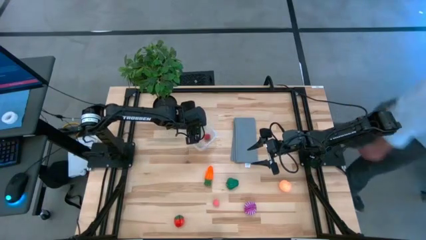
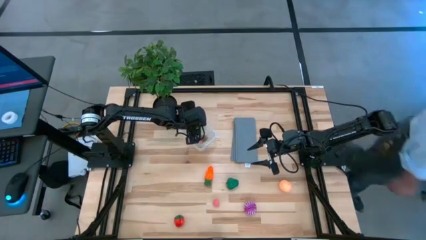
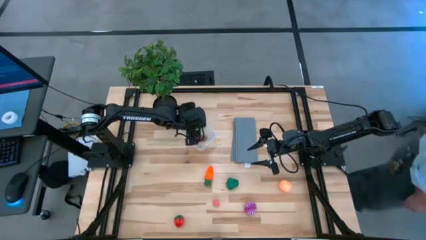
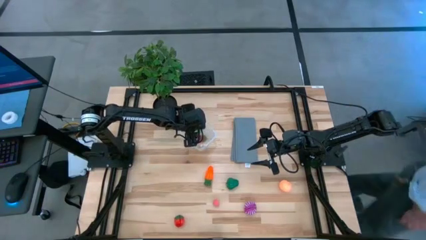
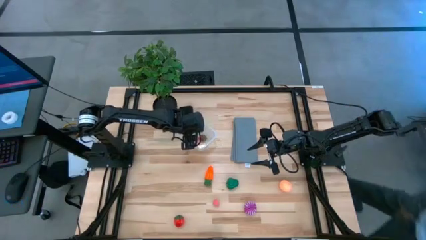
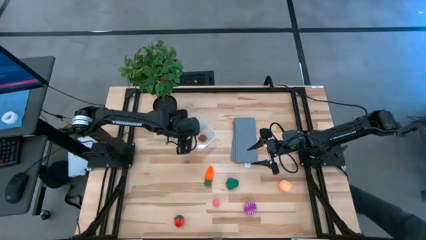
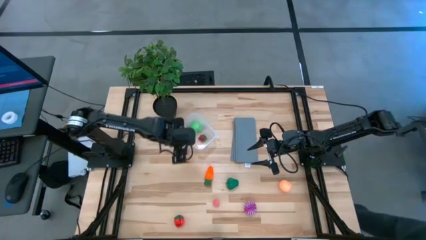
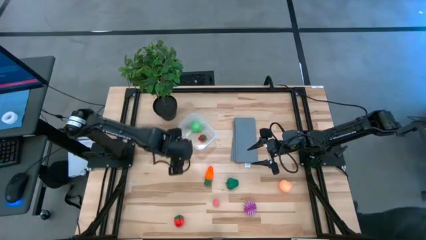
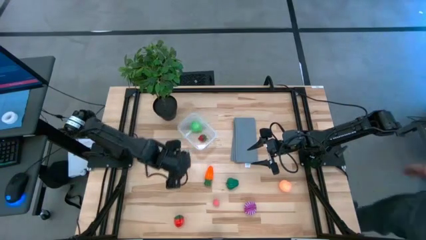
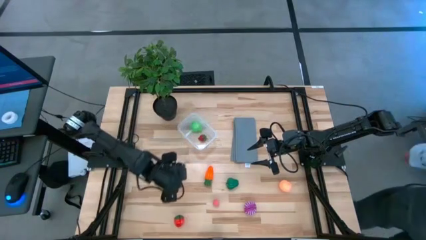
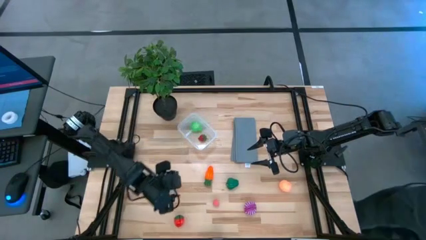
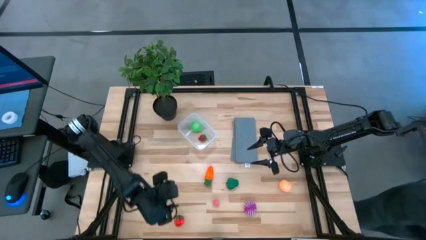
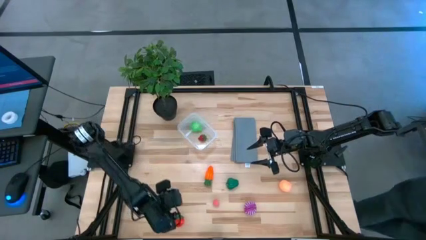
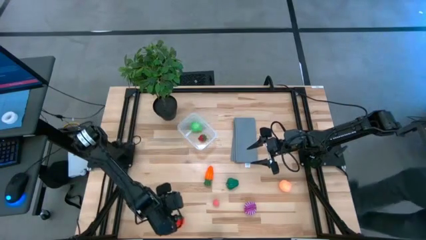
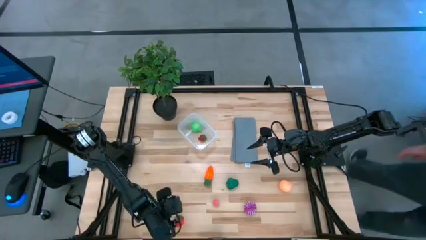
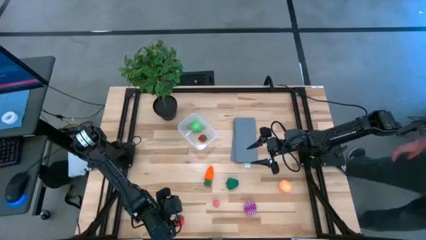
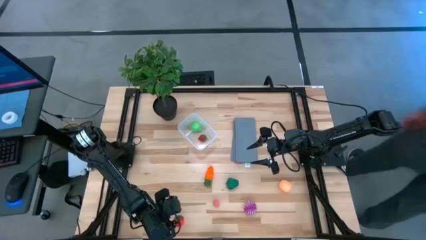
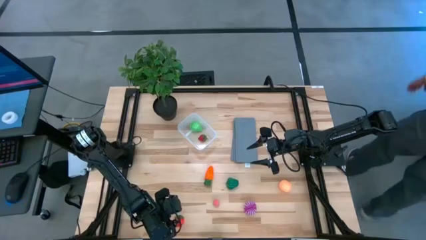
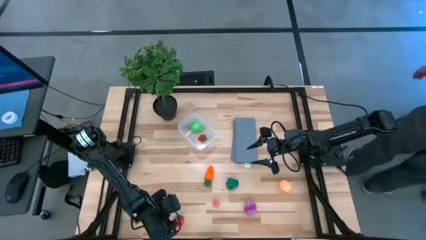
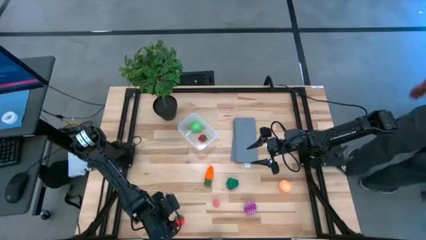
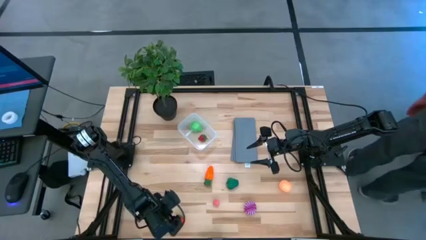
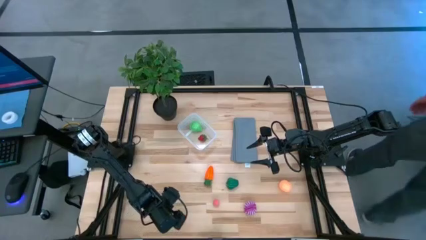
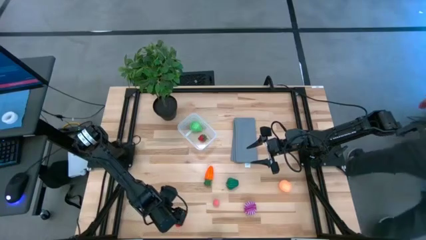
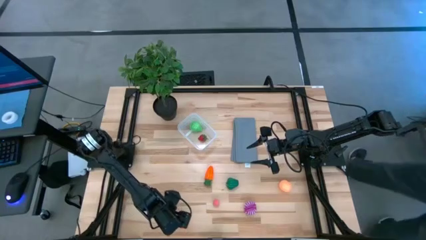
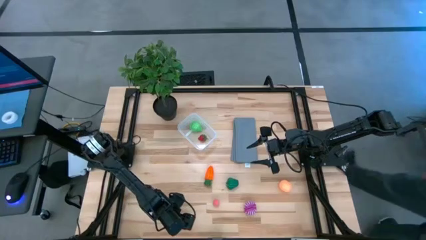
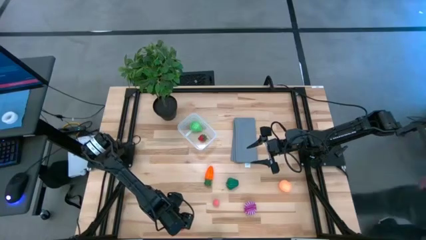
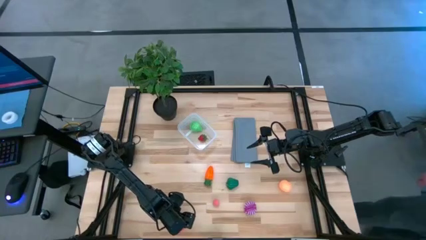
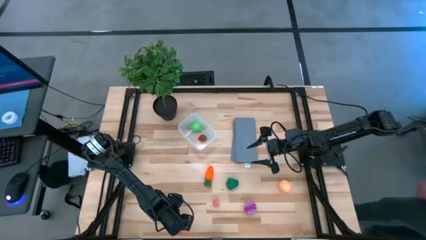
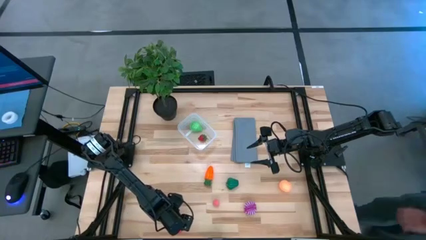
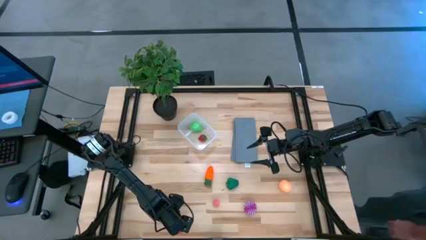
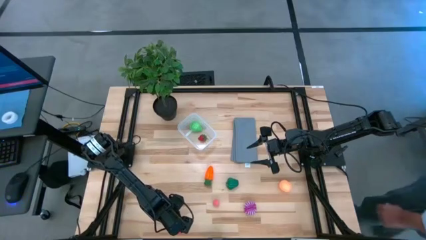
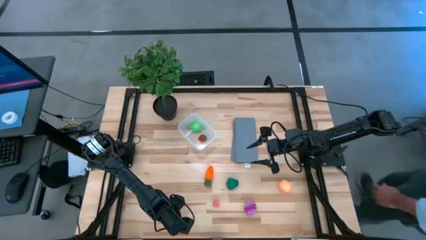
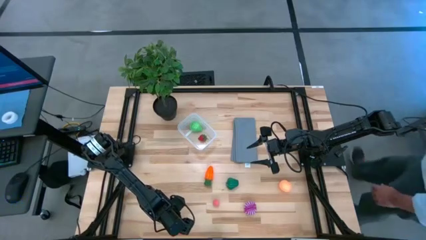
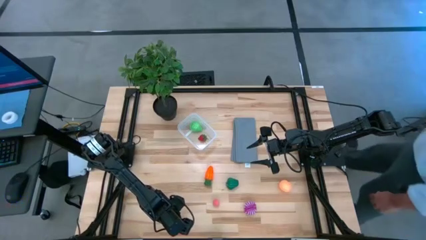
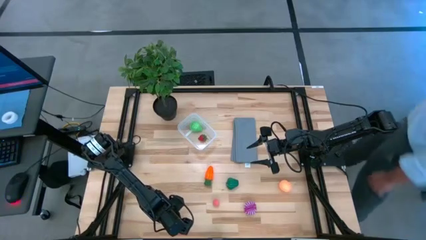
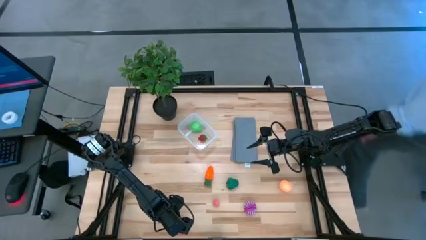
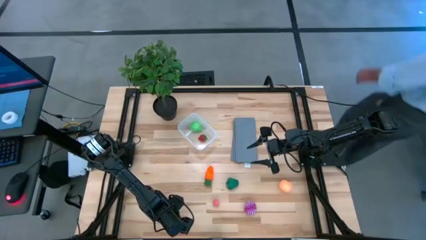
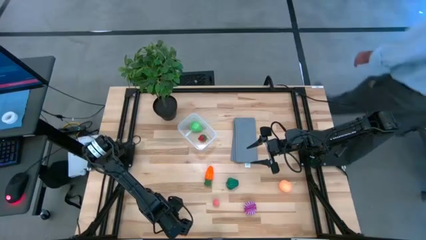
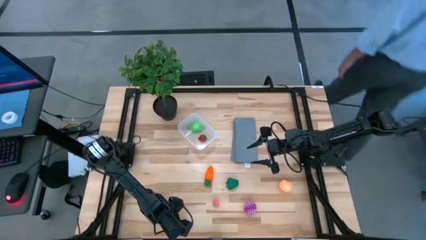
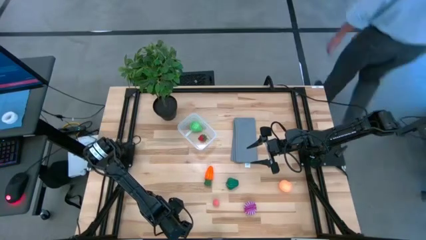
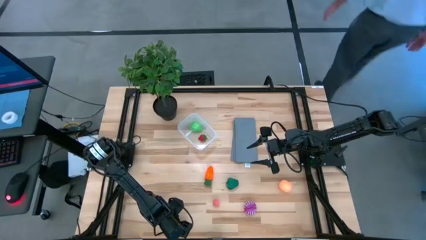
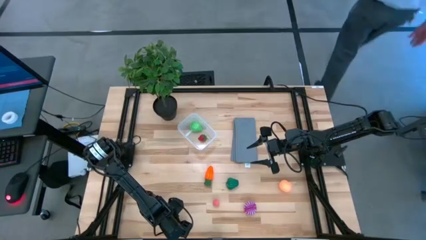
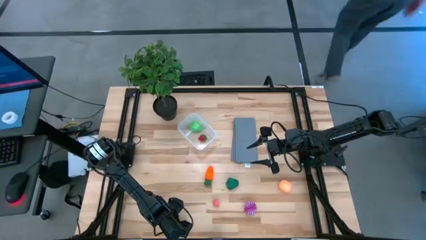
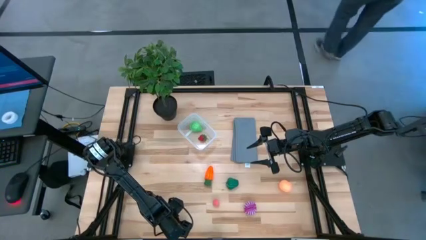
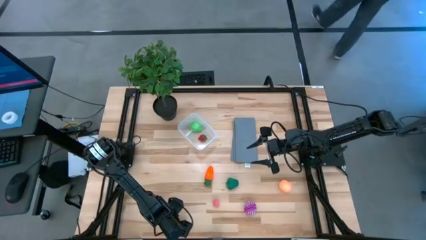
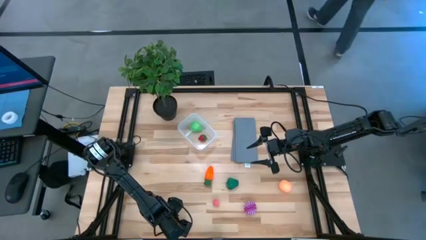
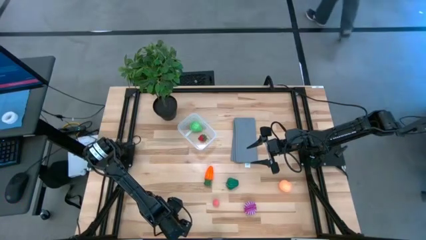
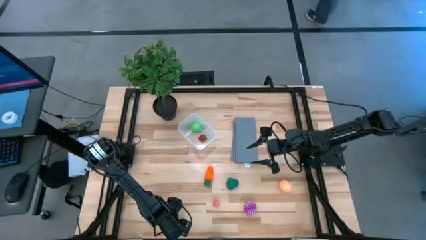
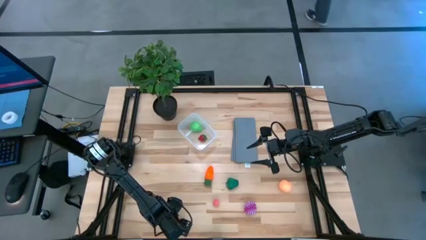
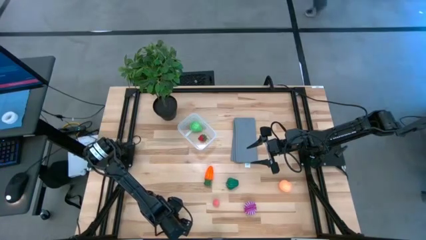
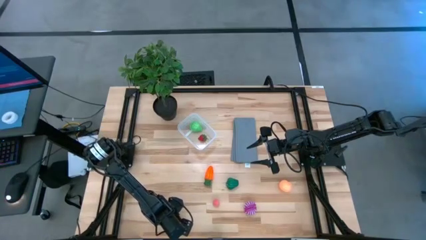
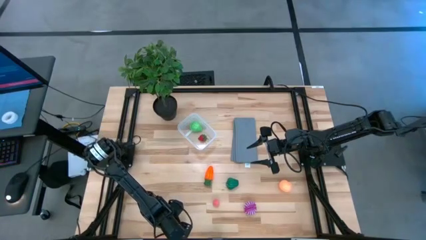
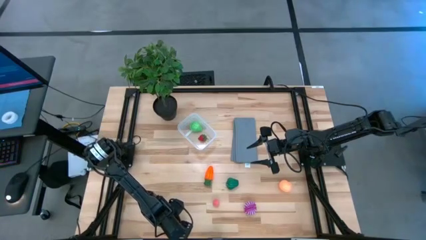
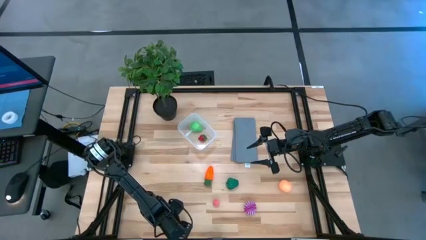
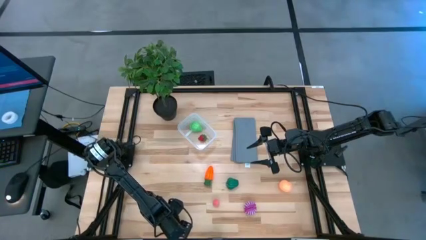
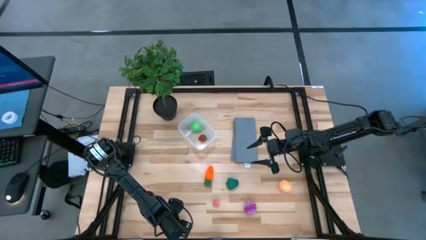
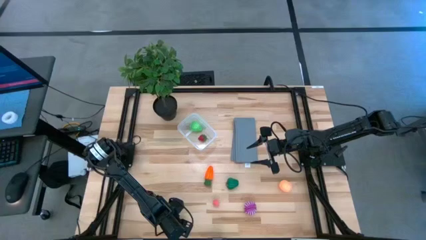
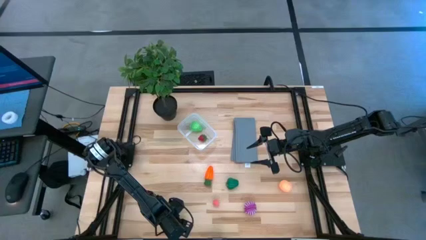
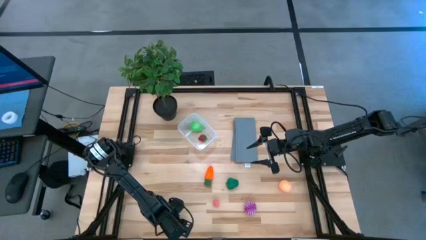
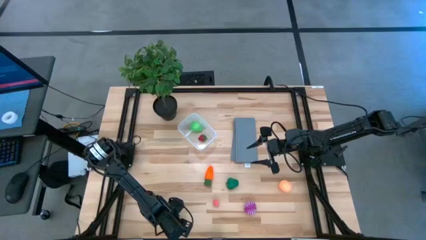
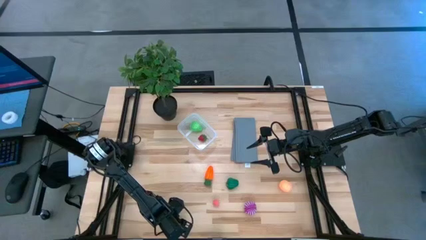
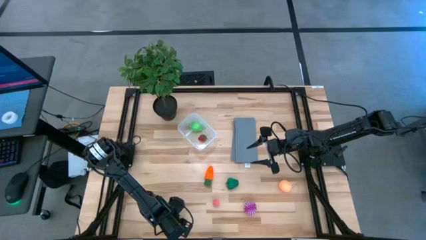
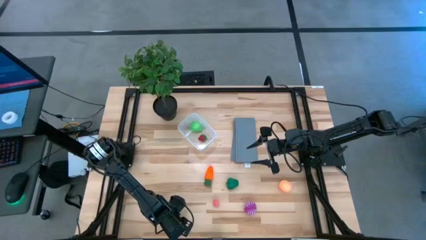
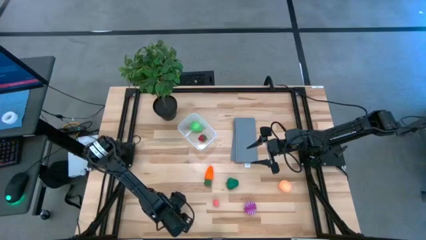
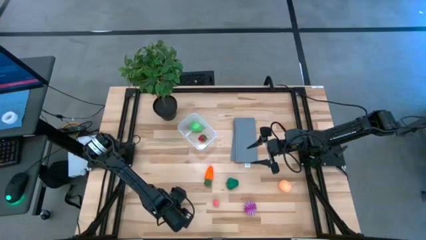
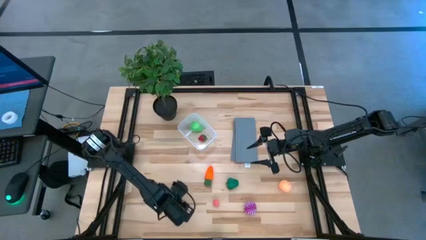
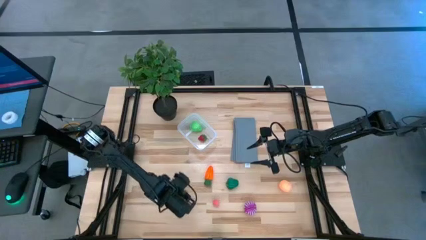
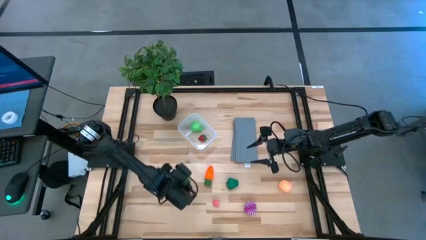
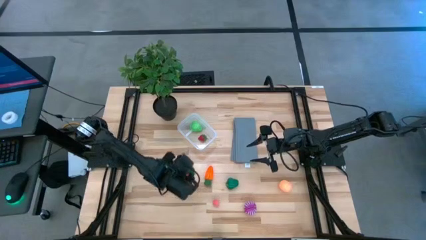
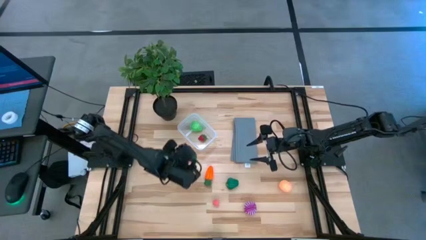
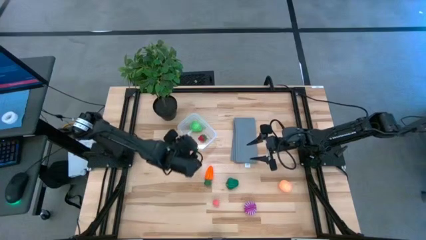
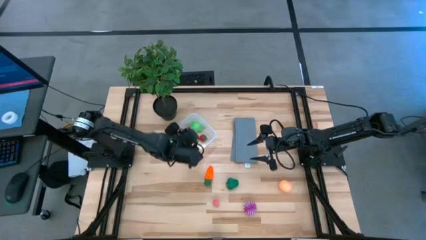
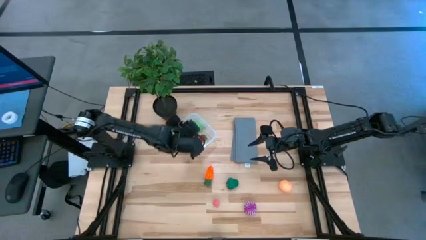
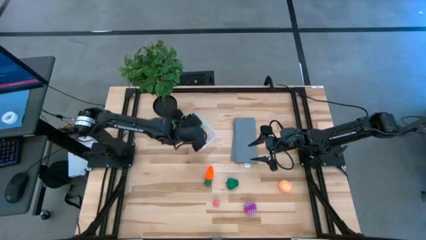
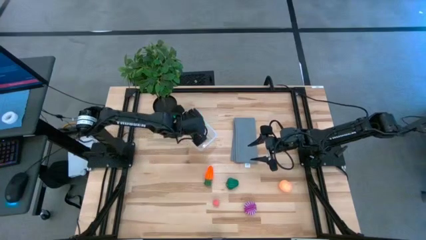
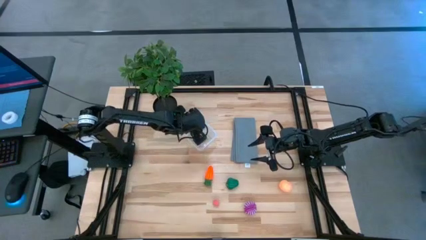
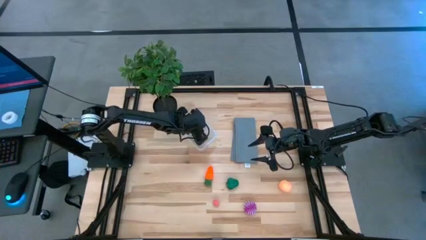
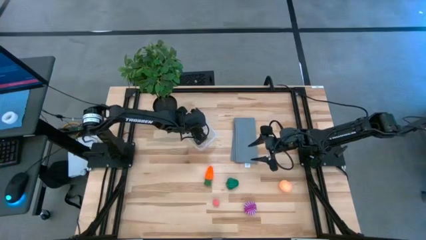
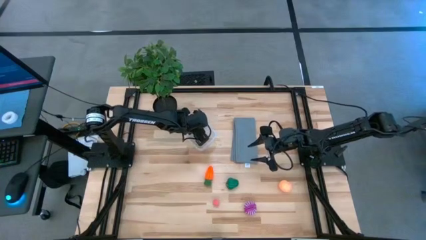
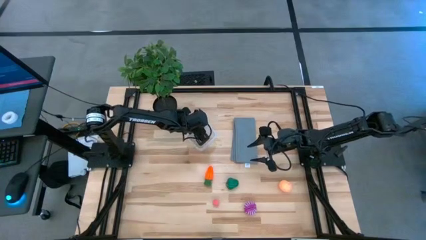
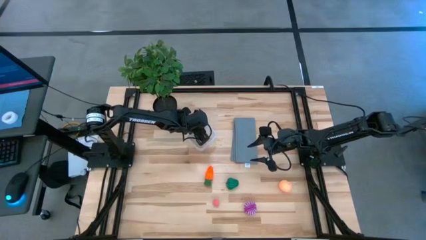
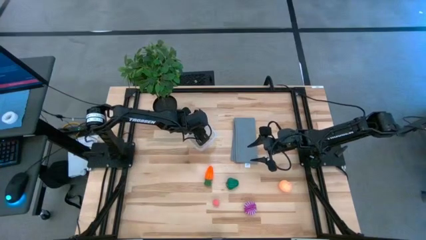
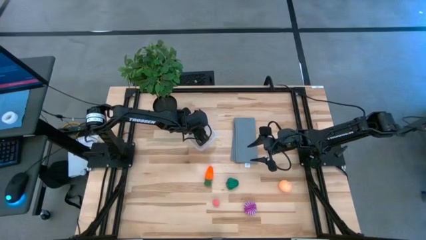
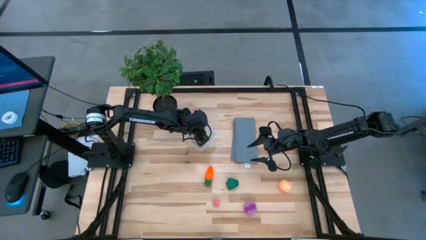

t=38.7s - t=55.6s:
Task: Pick and placing Produce into tupperware
Put the red strawberry into the transparent bin
